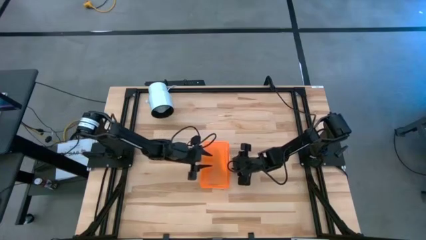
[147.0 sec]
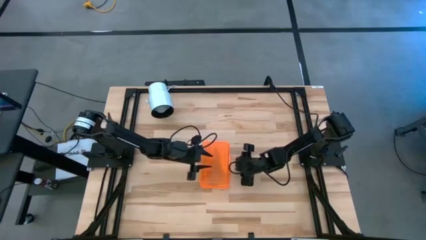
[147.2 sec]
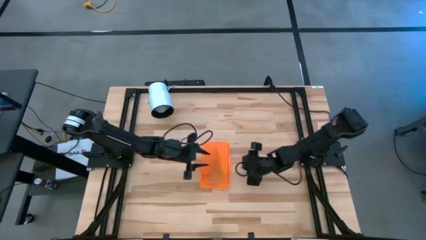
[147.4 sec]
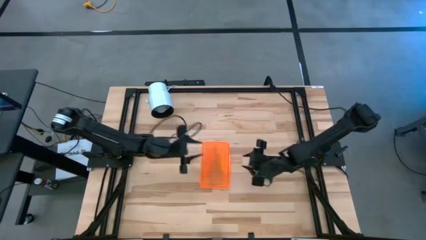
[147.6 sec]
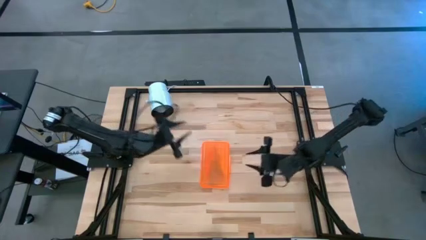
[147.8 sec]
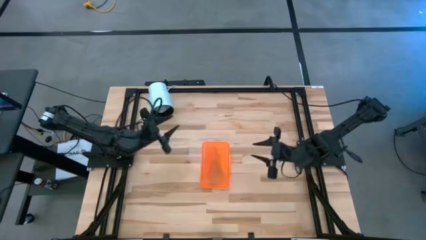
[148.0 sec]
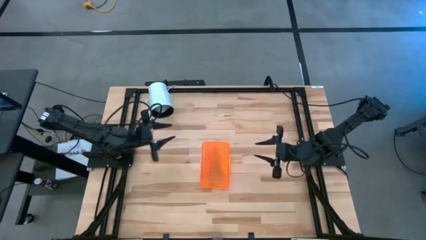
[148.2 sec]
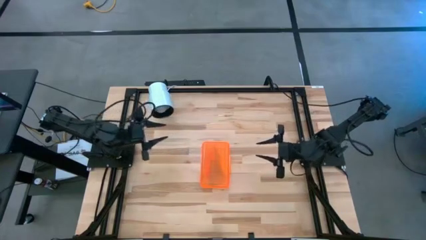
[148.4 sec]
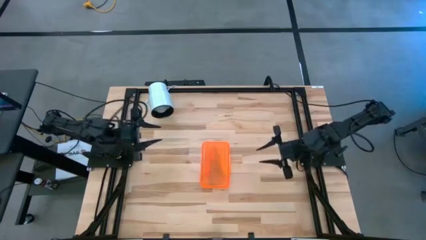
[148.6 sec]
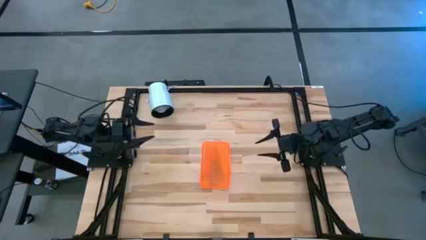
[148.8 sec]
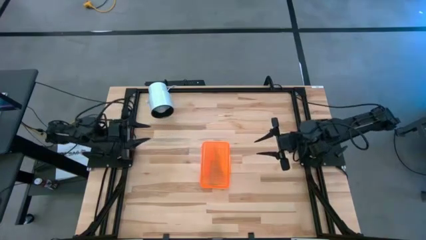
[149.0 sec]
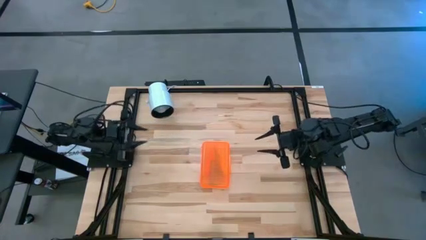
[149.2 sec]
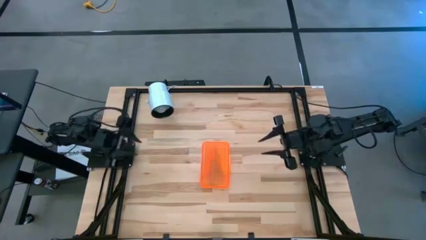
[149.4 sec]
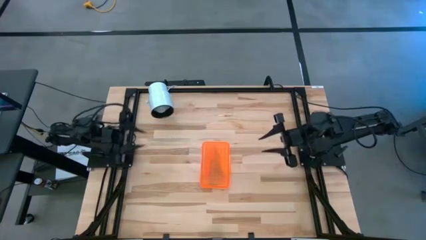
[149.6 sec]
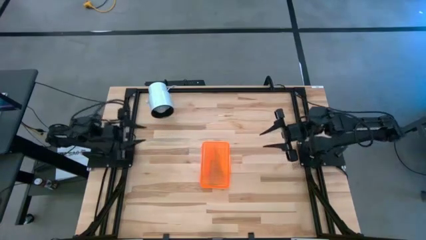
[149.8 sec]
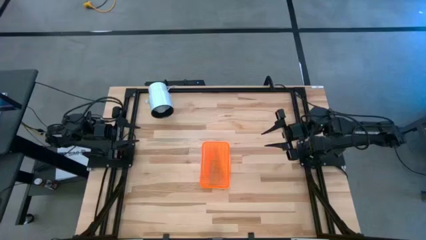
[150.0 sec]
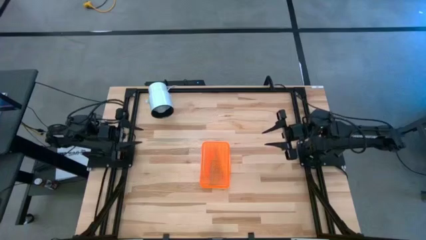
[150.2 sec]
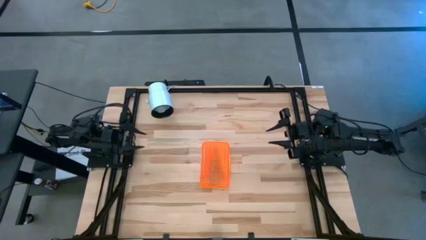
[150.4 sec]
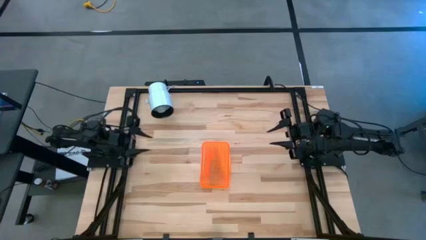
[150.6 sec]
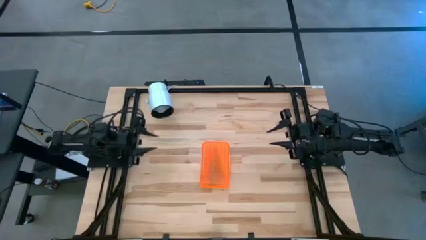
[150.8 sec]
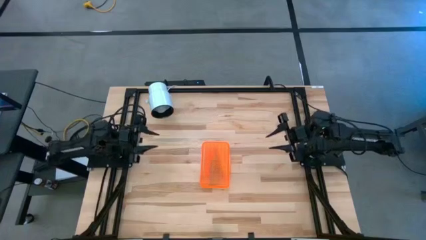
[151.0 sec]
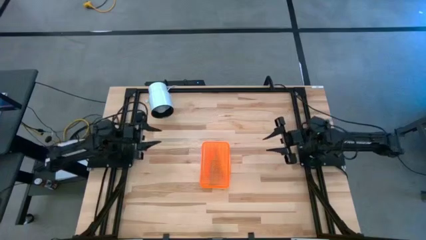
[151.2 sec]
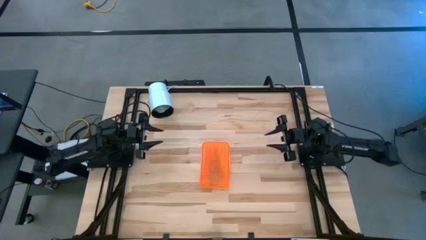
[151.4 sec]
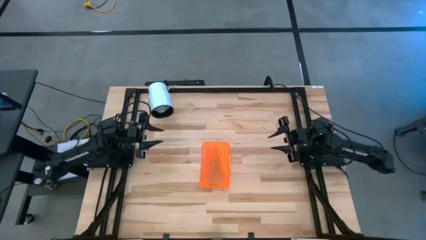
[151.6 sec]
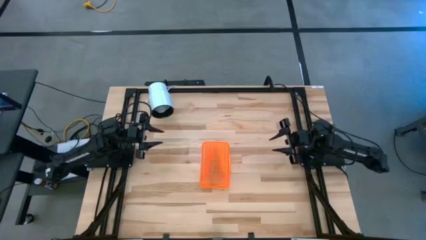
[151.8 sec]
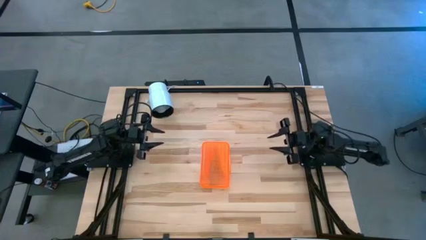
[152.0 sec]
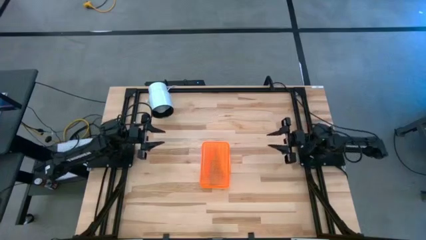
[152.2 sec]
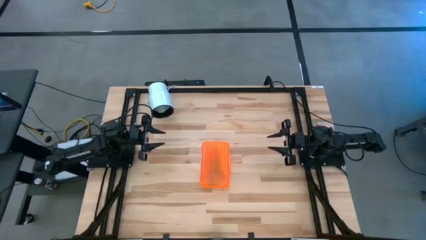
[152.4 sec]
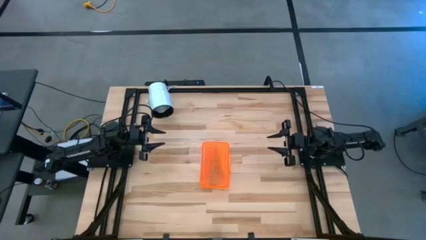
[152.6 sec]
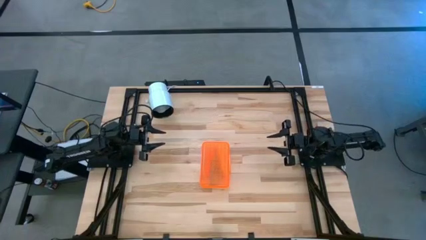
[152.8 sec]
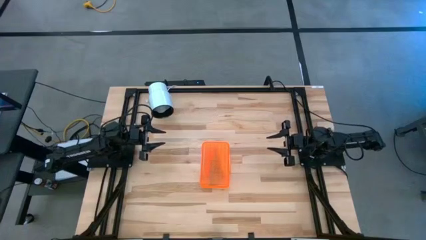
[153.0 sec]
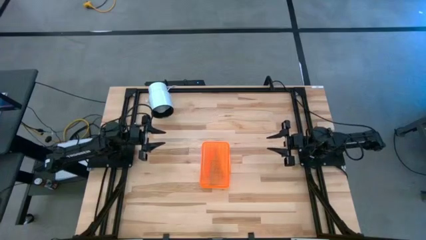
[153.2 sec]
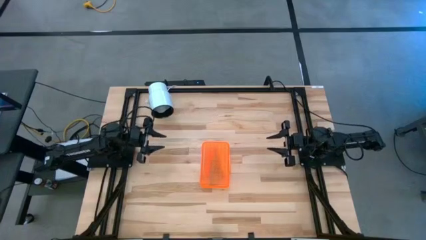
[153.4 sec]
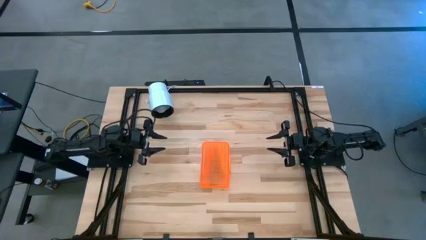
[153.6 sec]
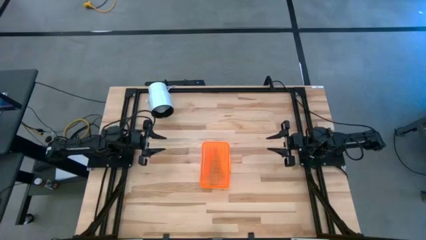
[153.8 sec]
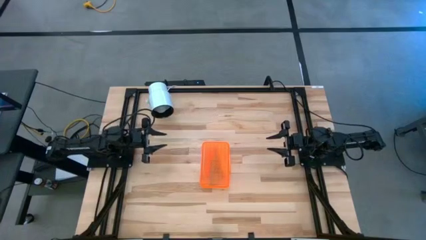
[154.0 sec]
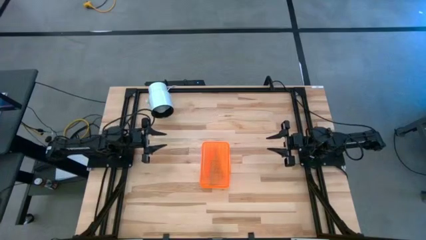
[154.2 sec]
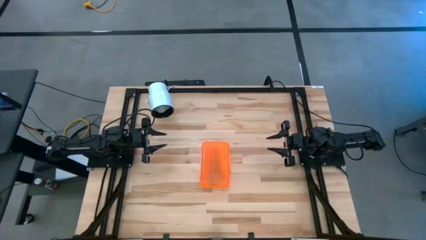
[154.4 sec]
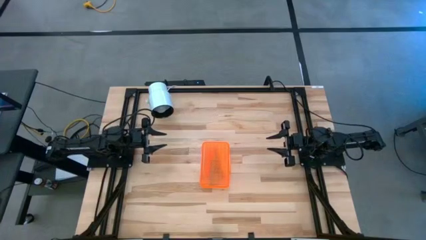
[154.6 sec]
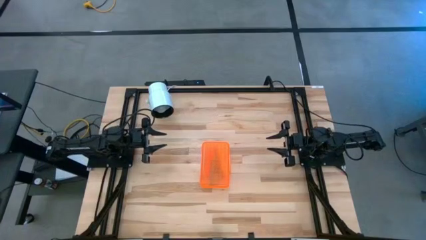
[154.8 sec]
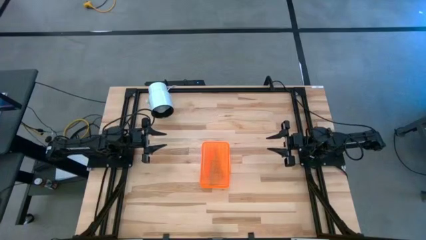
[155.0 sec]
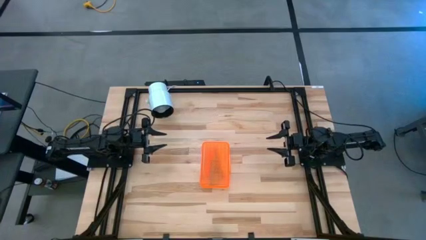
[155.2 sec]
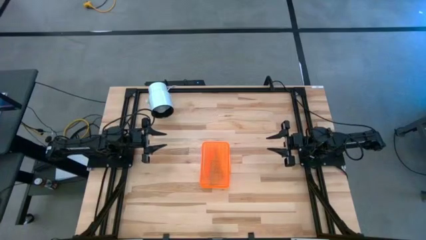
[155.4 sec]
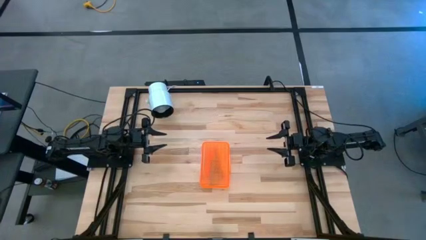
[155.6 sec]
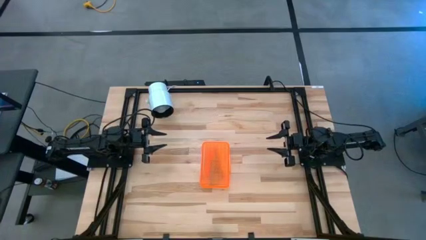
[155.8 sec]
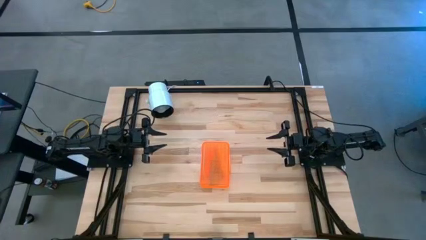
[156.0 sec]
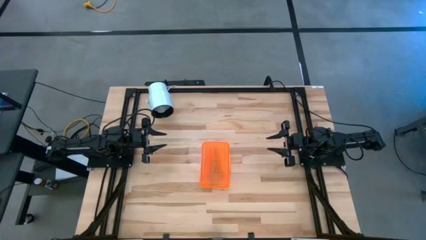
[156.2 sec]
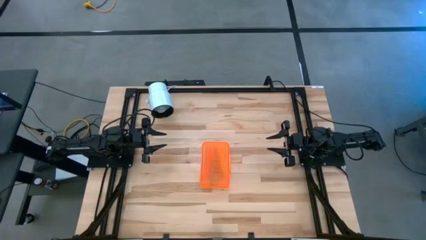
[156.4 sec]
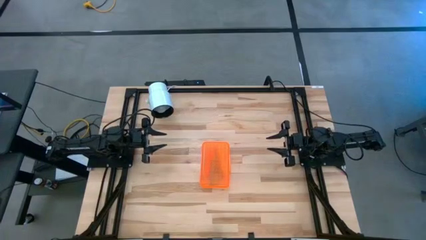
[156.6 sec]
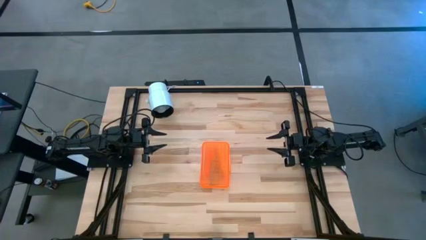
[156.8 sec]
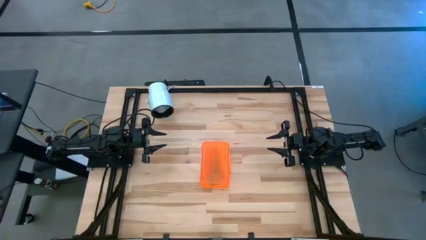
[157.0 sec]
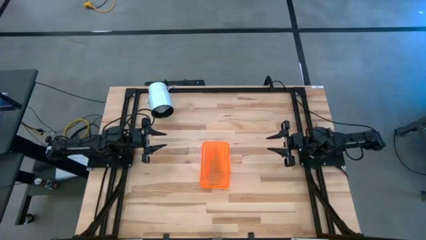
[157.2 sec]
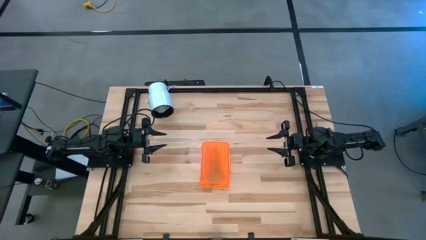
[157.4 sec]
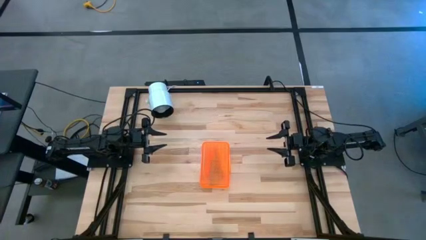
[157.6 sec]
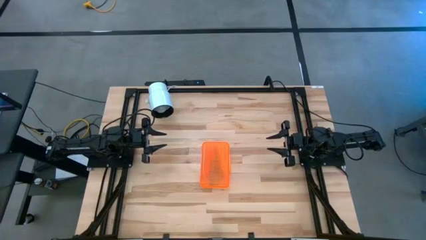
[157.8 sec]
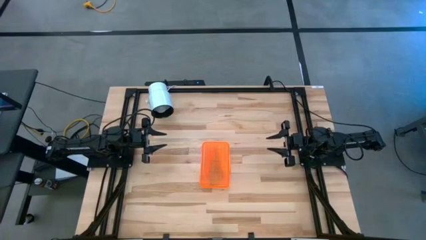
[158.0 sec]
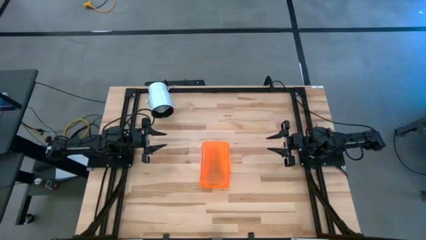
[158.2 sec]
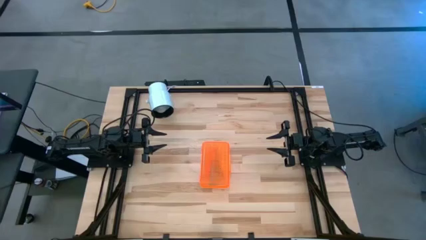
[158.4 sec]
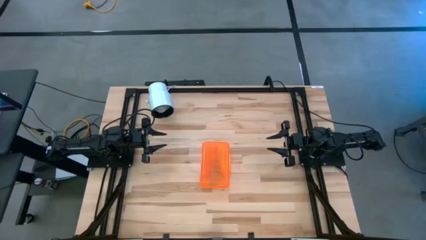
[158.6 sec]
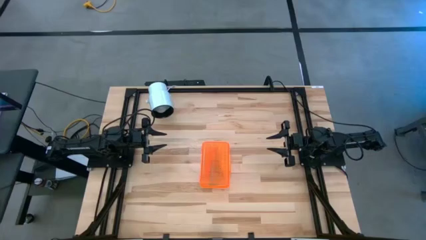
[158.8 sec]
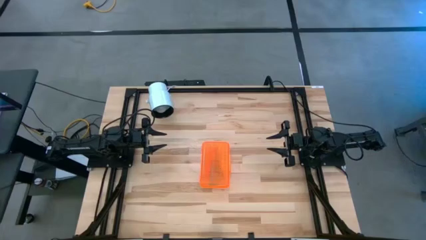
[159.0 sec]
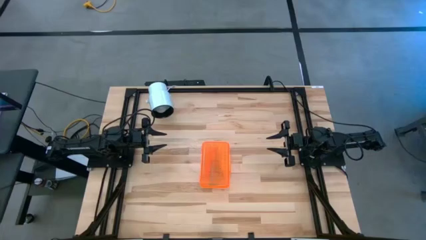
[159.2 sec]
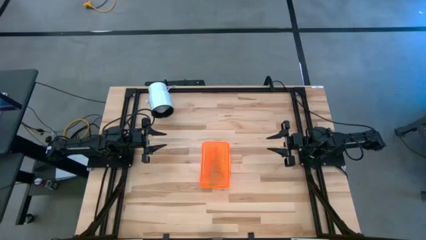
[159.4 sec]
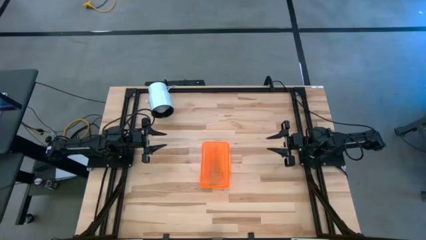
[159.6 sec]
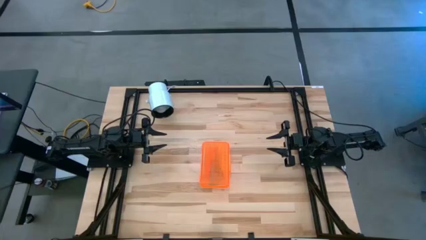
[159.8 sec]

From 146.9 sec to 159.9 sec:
Task: Pick & place school supplies into a supply box
Return to Home Position
